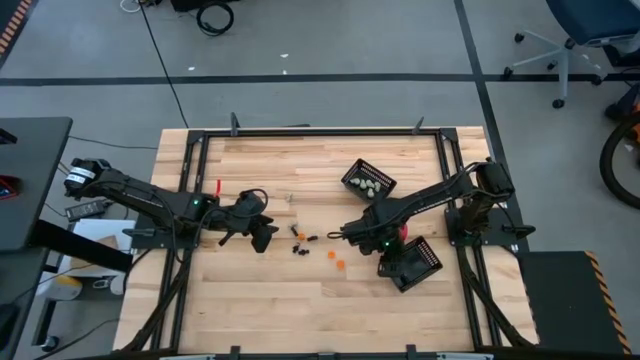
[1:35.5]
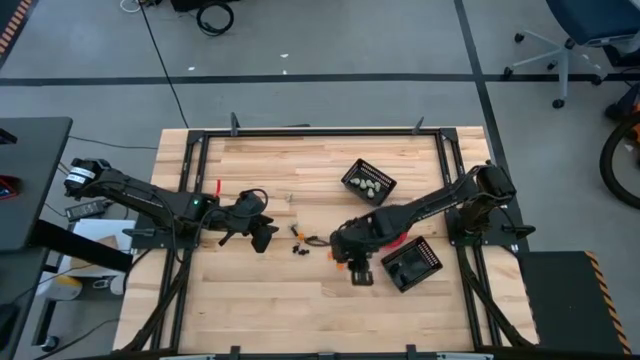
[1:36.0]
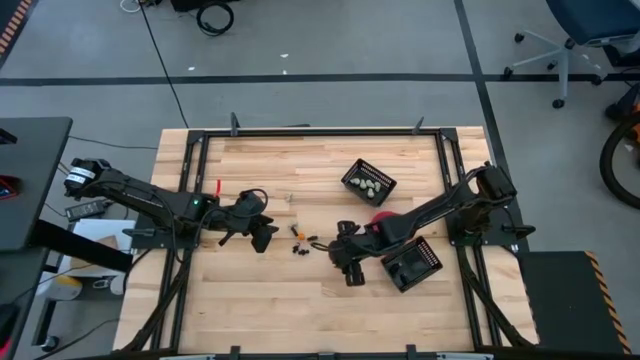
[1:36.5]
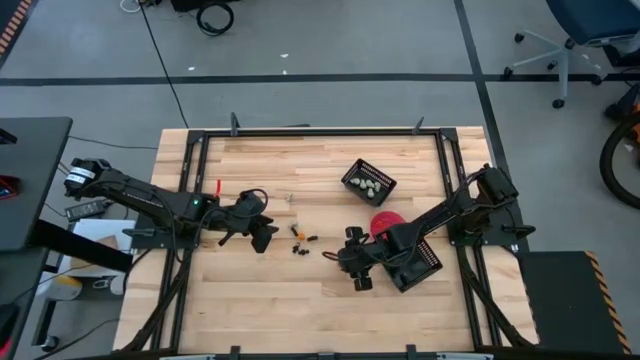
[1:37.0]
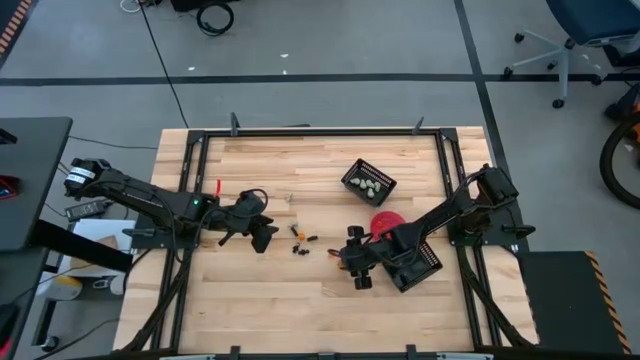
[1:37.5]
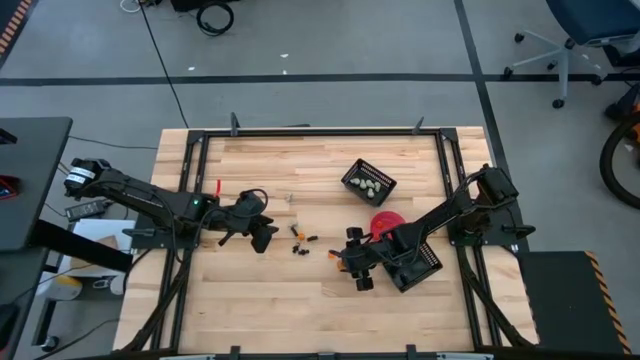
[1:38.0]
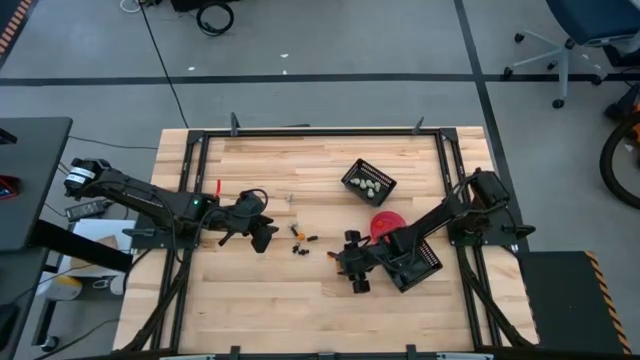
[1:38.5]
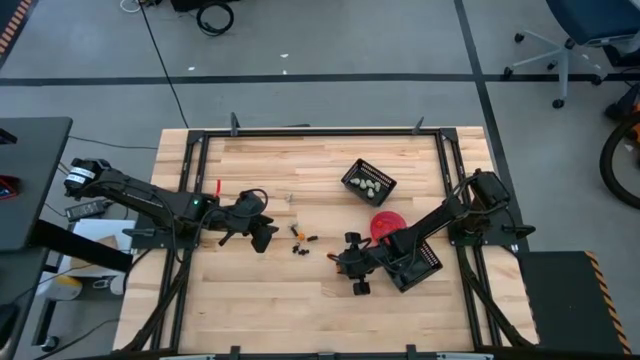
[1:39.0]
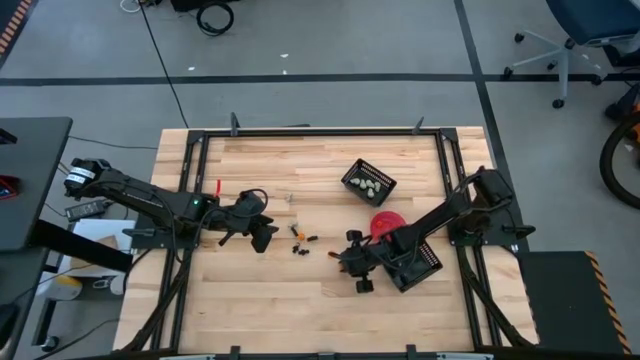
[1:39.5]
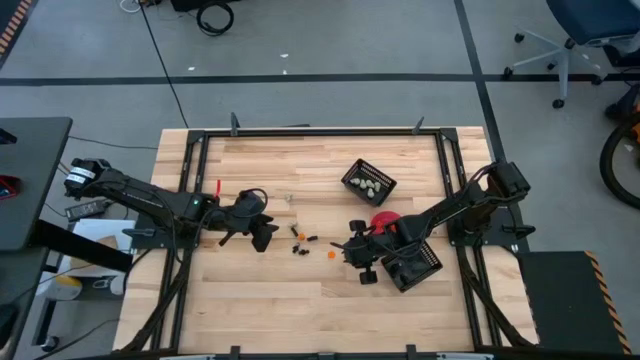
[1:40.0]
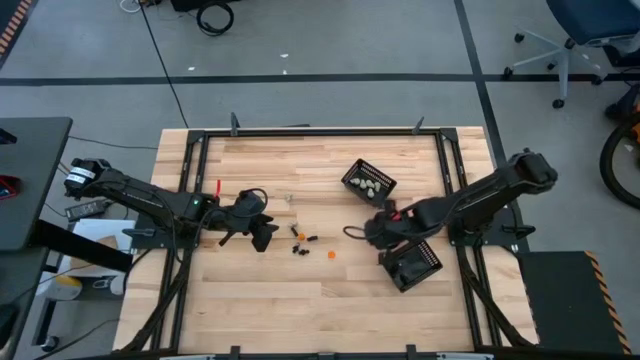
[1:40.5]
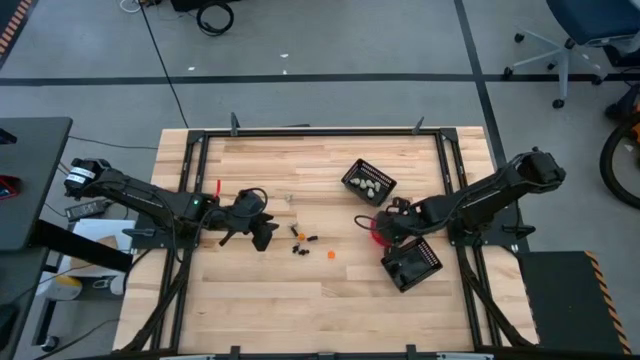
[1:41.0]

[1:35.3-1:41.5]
Task: Sort Halloween decoration
Put the orange pumpkin toy into the red bowl

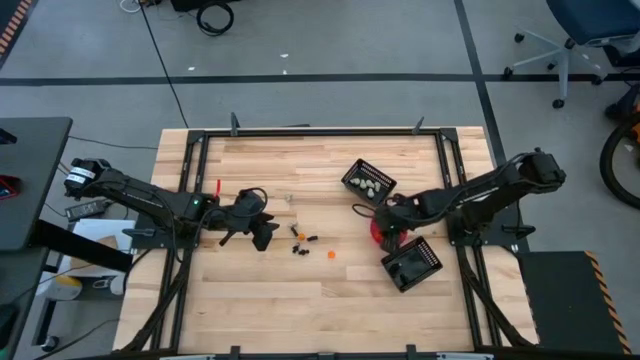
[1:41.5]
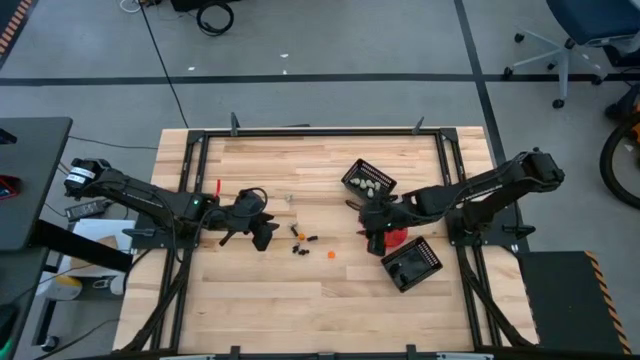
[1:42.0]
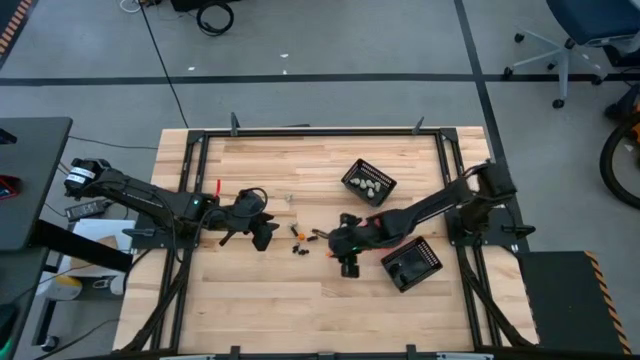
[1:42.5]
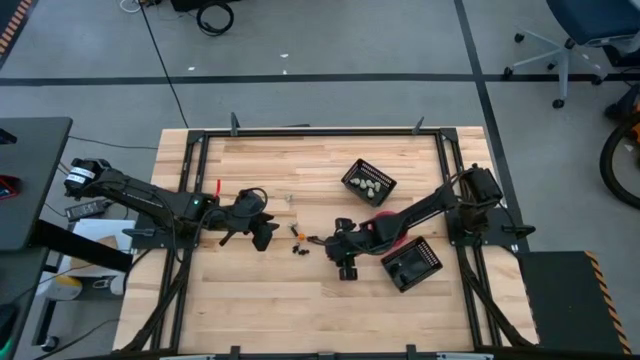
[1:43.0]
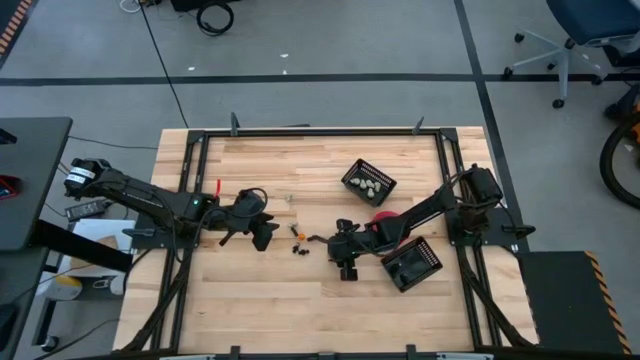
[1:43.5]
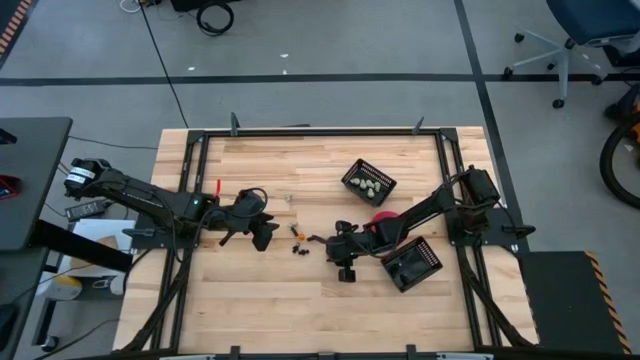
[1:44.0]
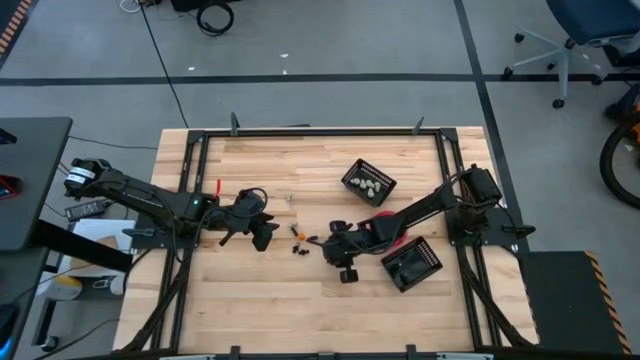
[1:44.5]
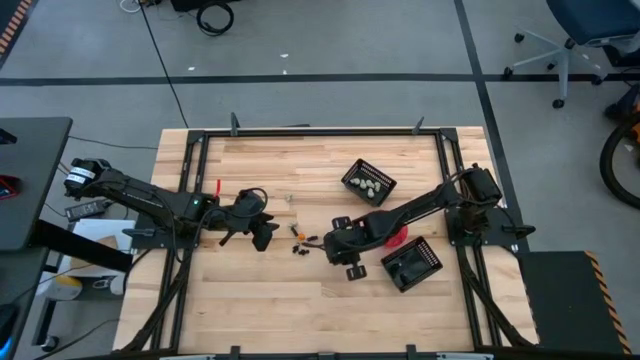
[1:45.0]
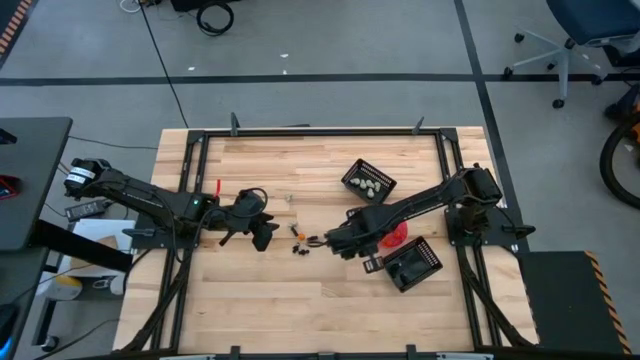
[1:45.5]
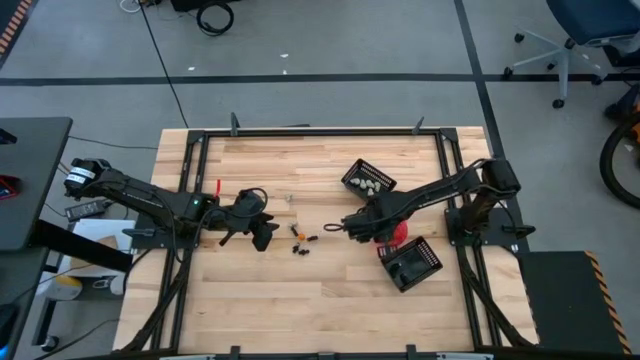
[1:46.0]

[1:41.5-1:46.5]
Put the orange pumpkin into the red bowl

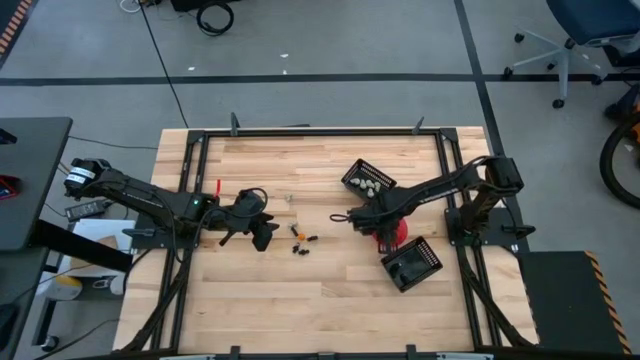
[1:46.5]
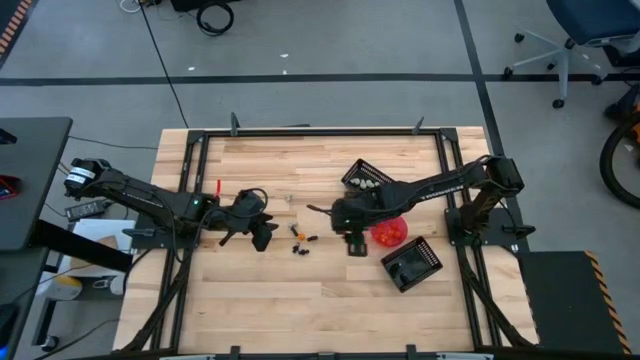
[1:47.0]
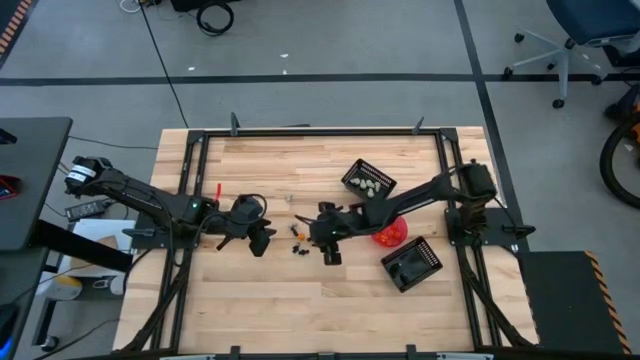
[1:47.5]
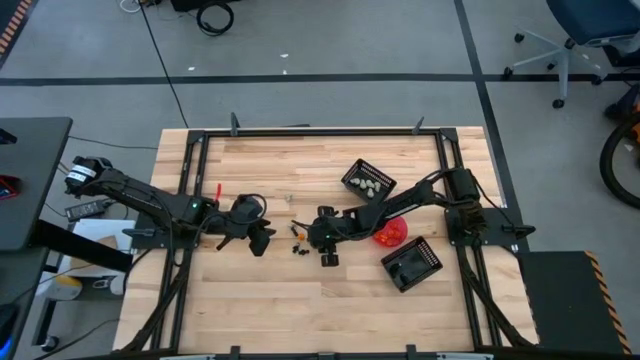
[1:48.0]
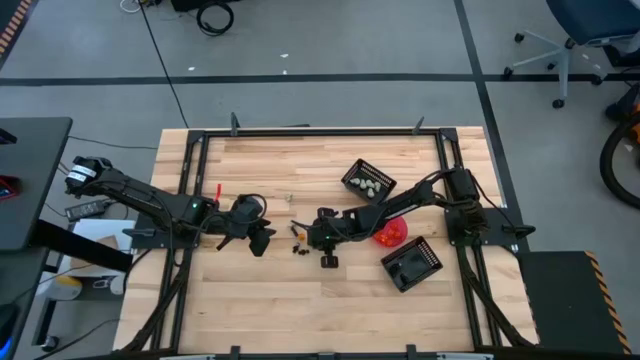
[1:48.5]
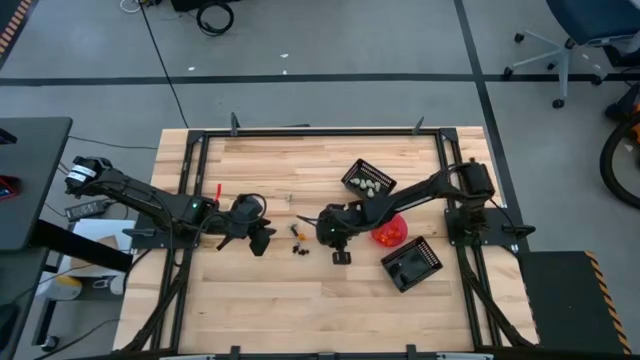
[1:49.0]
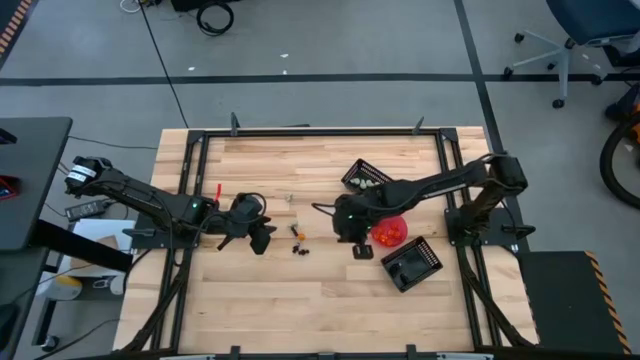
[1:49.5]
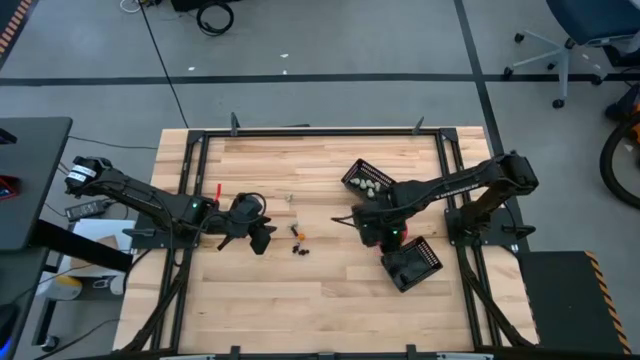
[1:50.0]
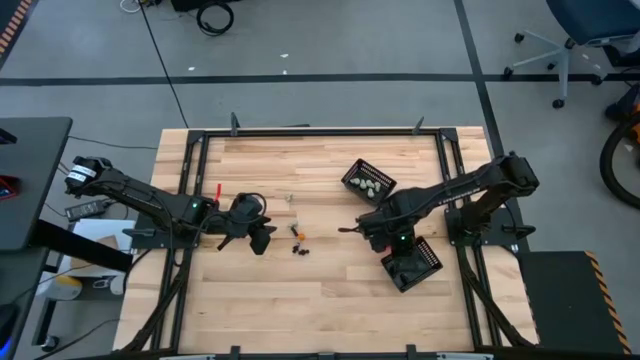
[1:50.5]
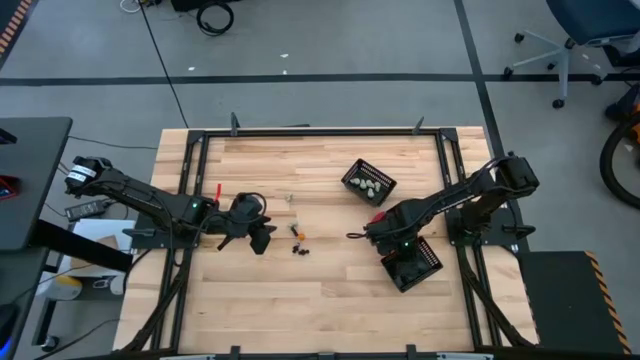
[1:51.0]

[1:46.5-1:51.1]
Put the black skeleton toy into the bottom black basket

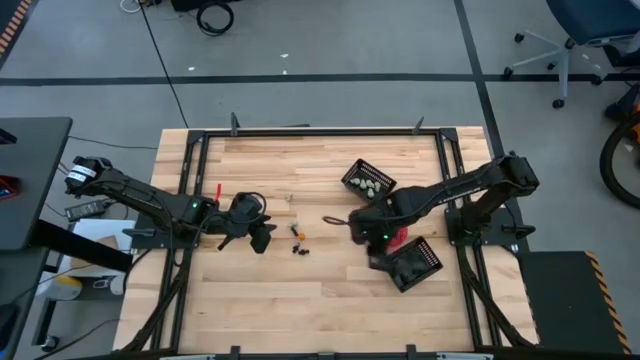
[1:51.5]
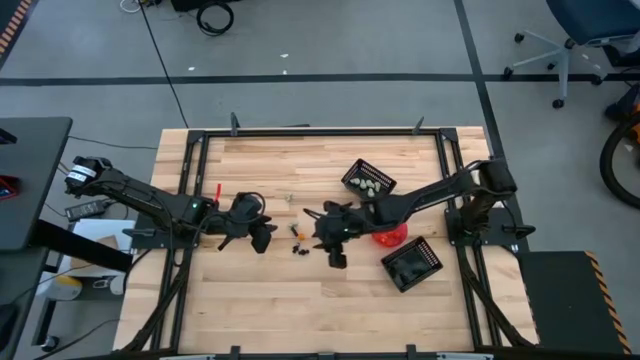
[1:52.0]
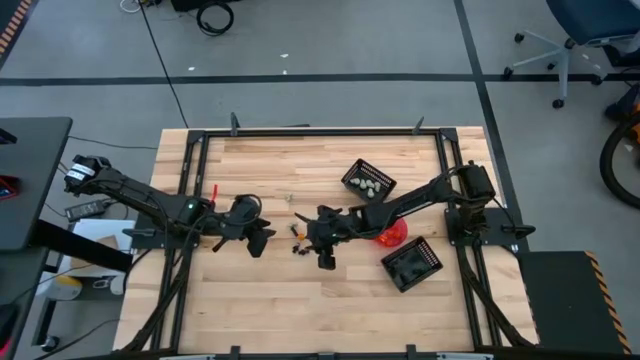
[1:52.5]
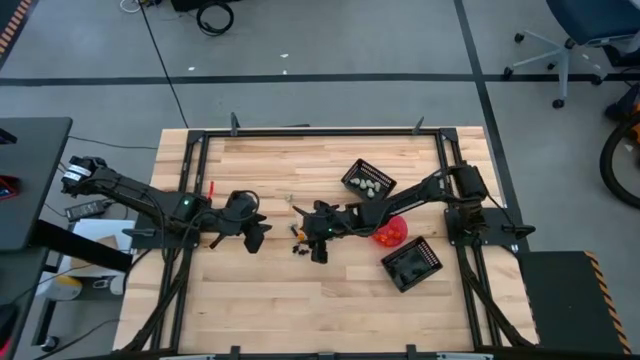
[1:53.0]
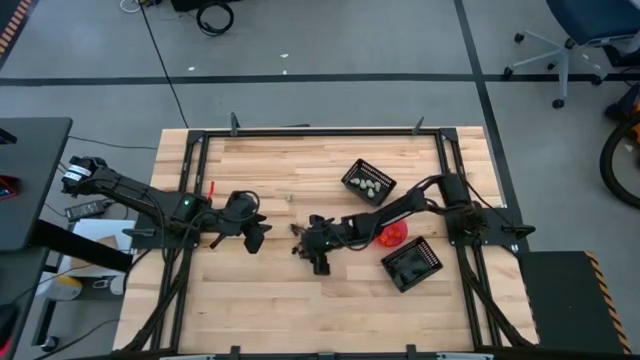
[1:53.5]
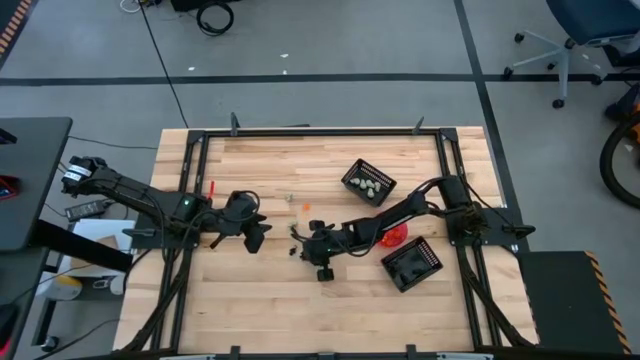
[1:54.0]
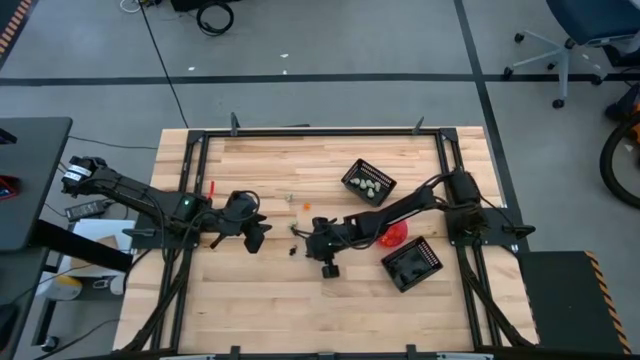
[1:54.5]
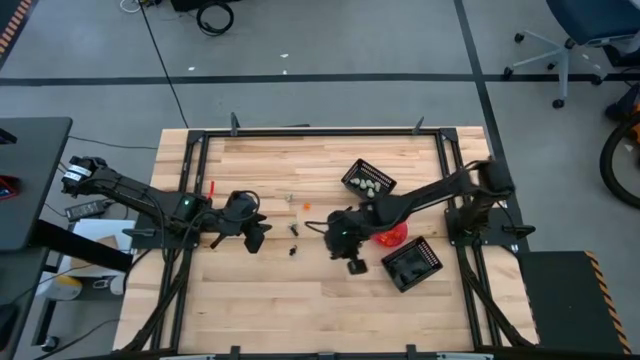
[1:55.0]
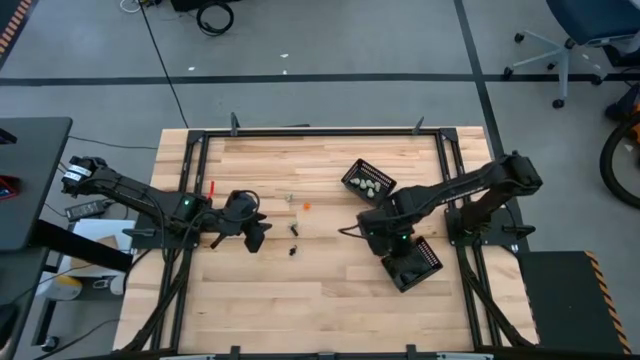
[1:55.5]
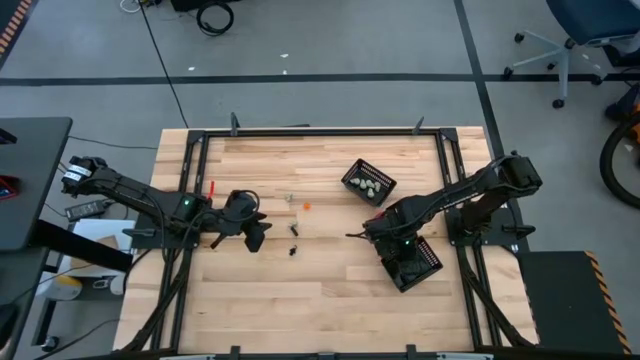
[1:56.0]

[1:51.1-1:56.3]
Put the black skeleton toy into the bottom black basket
